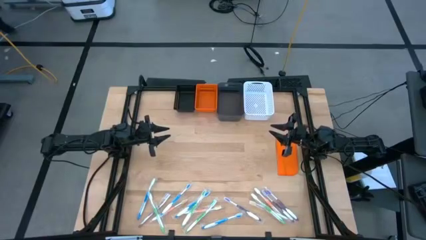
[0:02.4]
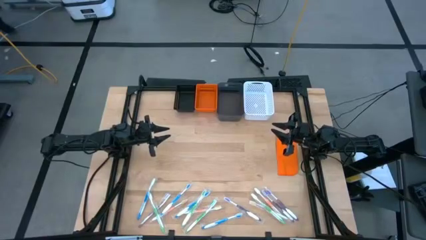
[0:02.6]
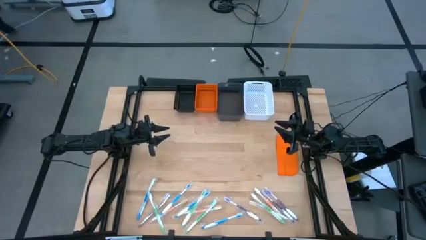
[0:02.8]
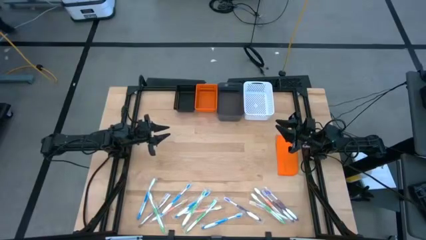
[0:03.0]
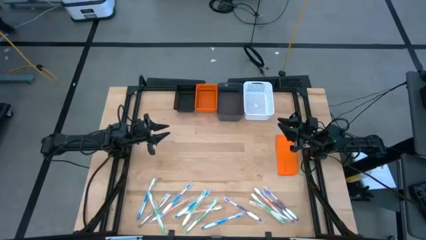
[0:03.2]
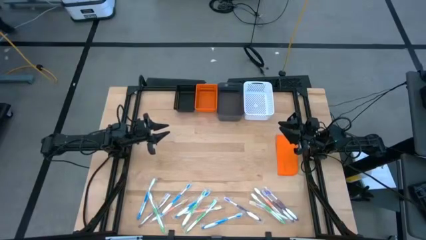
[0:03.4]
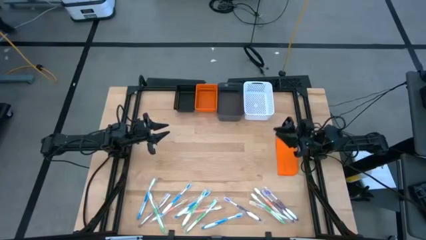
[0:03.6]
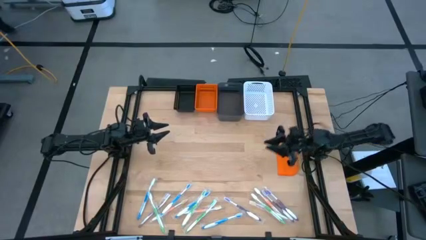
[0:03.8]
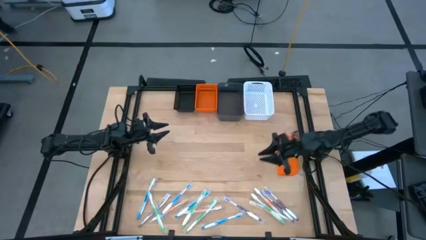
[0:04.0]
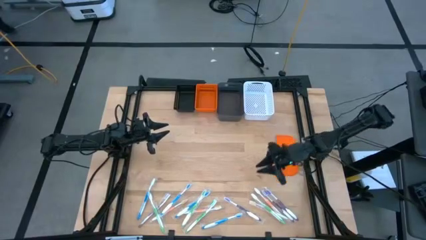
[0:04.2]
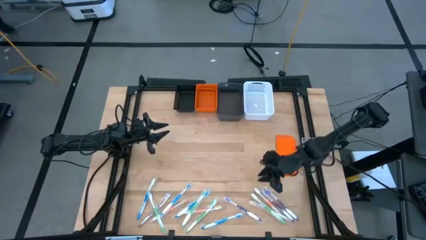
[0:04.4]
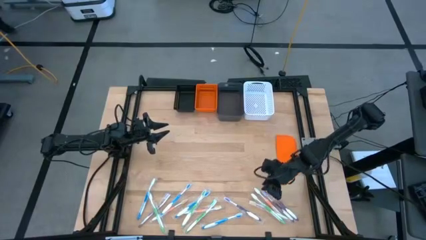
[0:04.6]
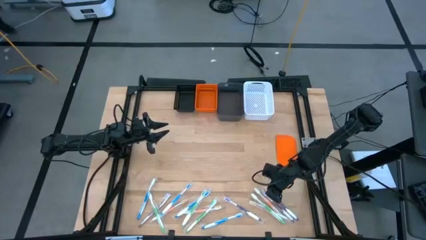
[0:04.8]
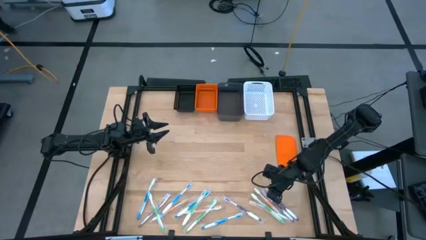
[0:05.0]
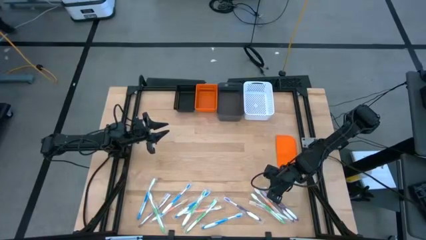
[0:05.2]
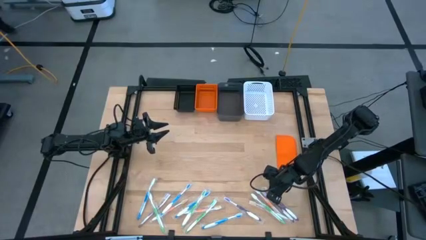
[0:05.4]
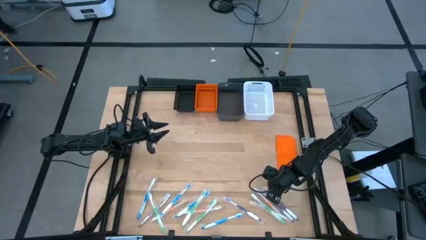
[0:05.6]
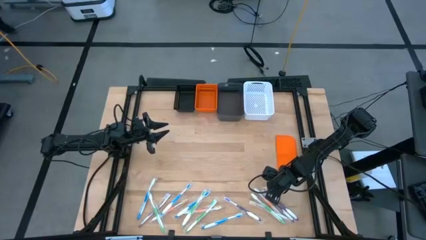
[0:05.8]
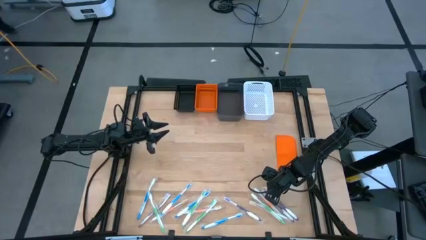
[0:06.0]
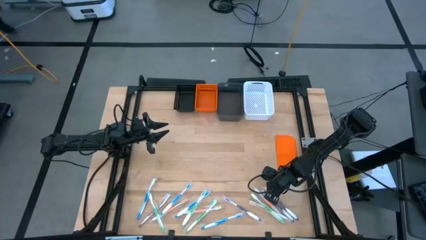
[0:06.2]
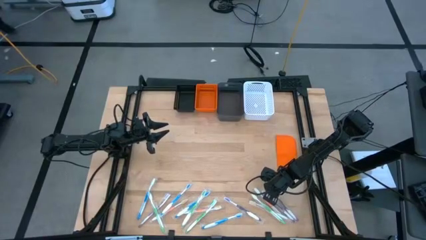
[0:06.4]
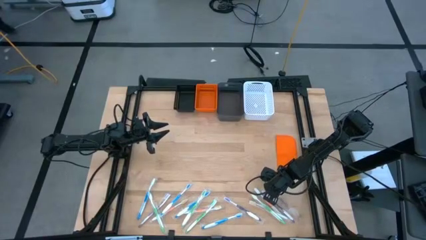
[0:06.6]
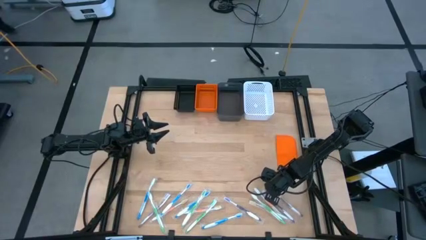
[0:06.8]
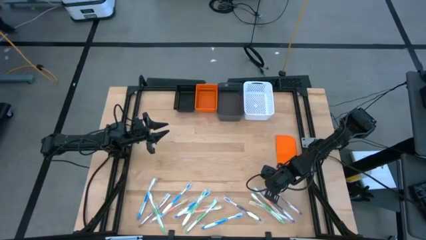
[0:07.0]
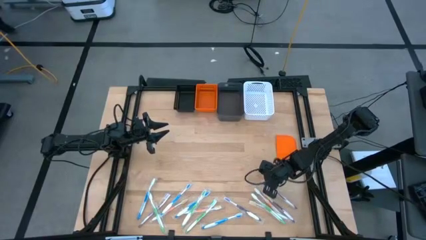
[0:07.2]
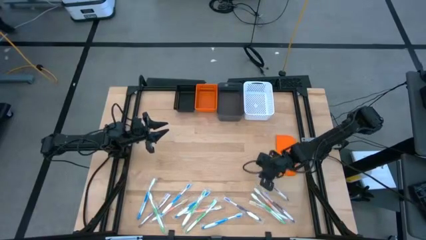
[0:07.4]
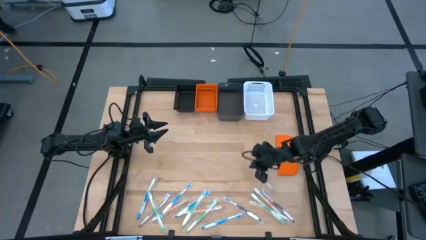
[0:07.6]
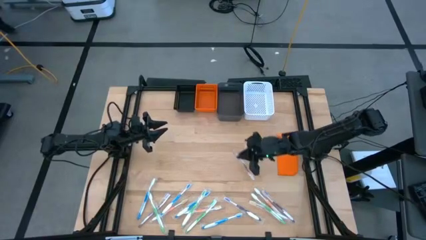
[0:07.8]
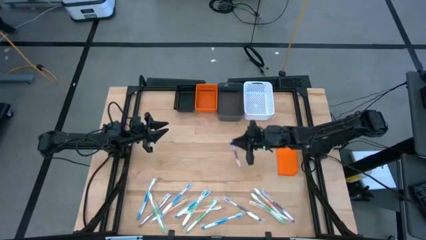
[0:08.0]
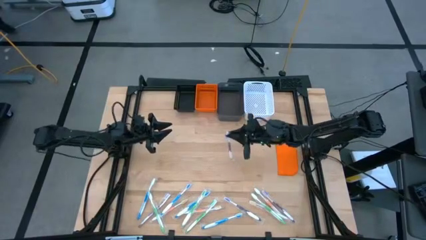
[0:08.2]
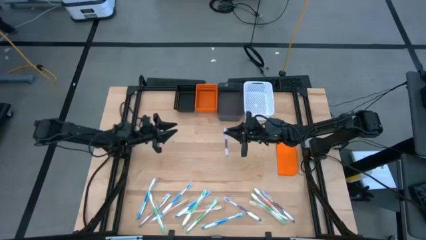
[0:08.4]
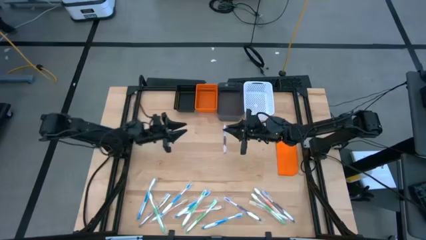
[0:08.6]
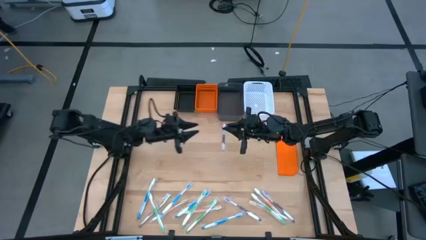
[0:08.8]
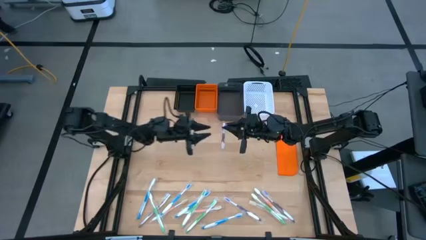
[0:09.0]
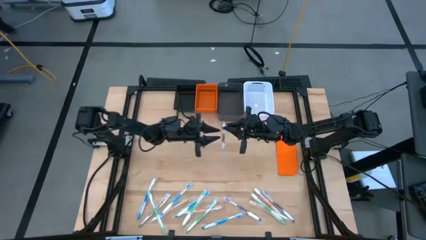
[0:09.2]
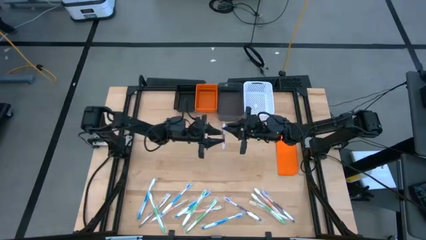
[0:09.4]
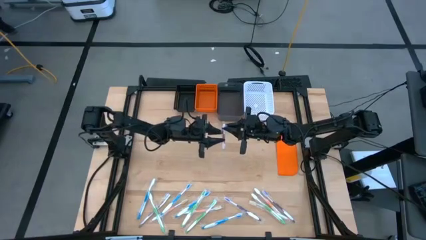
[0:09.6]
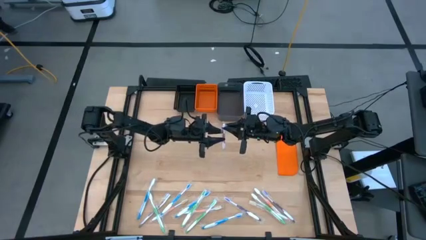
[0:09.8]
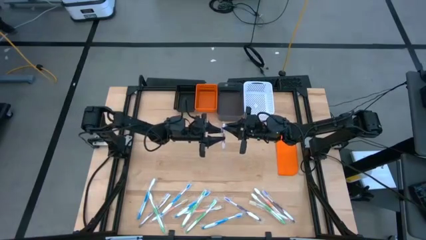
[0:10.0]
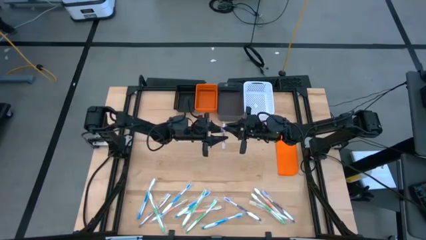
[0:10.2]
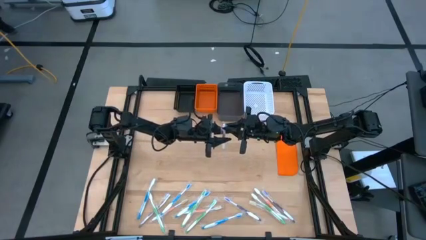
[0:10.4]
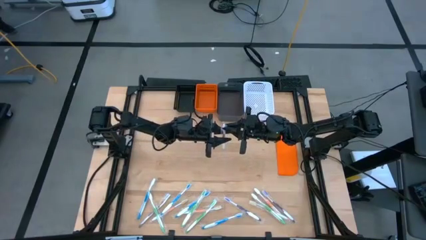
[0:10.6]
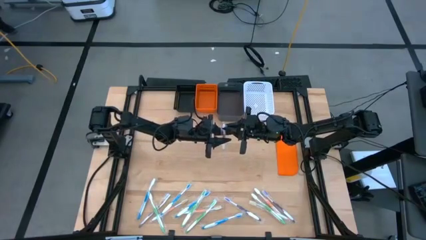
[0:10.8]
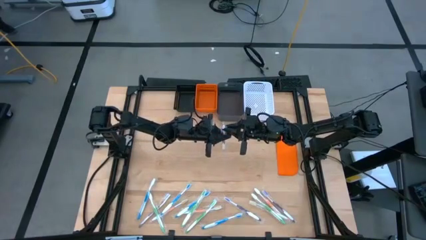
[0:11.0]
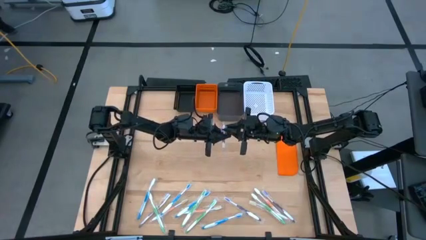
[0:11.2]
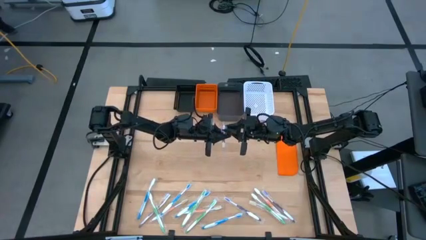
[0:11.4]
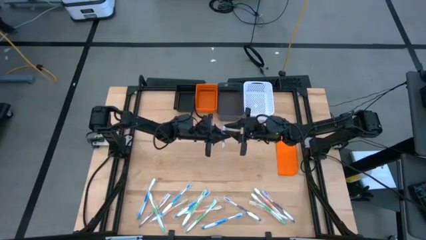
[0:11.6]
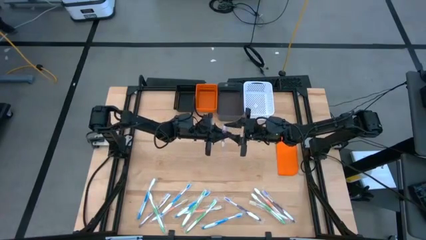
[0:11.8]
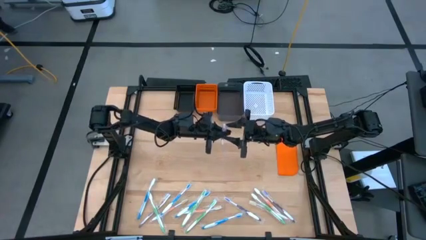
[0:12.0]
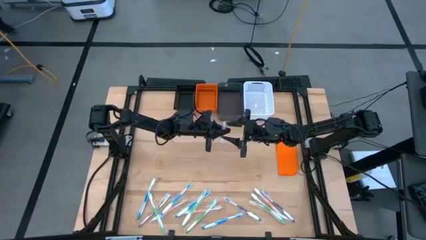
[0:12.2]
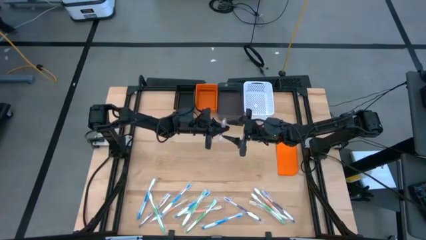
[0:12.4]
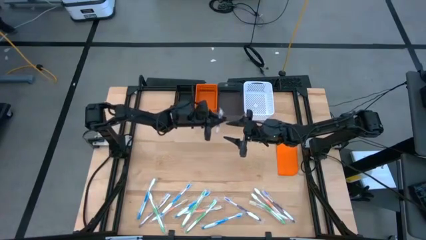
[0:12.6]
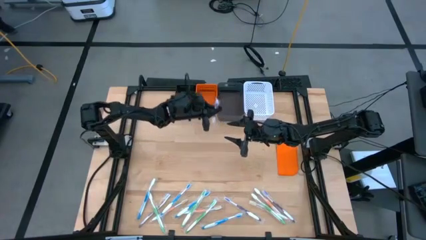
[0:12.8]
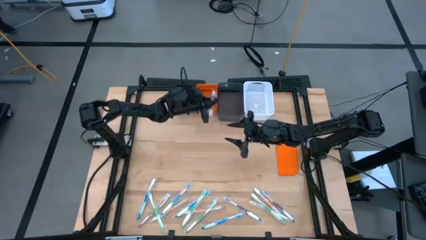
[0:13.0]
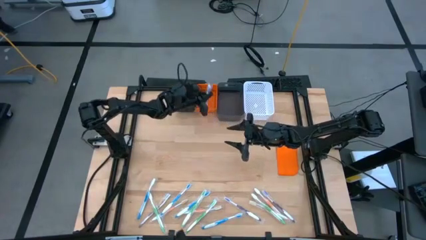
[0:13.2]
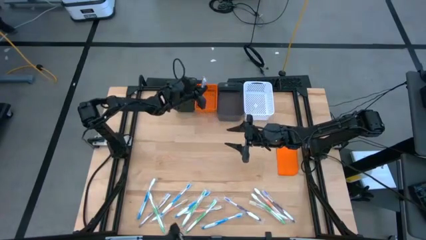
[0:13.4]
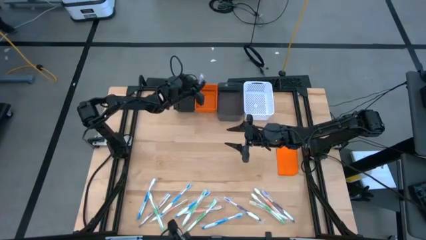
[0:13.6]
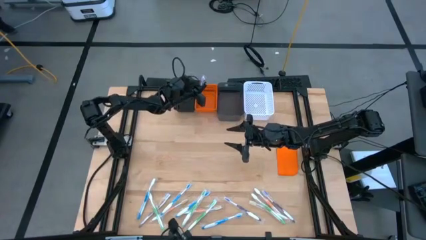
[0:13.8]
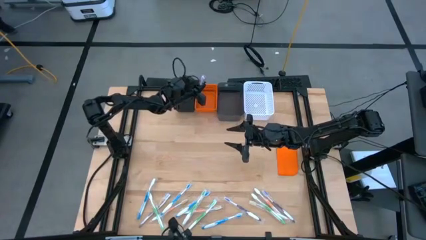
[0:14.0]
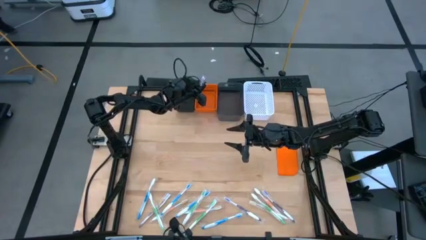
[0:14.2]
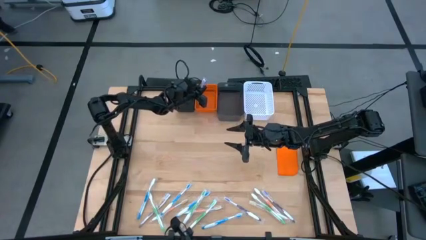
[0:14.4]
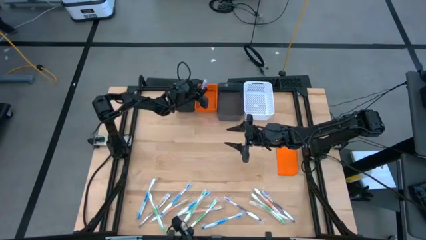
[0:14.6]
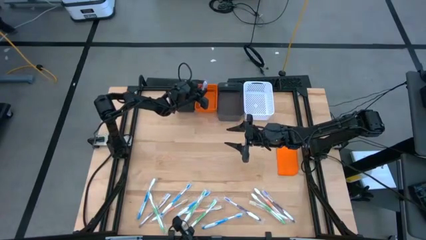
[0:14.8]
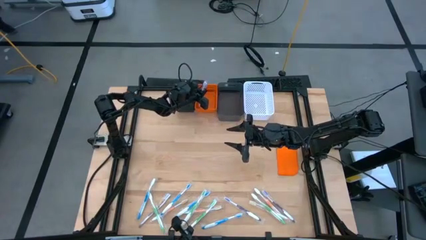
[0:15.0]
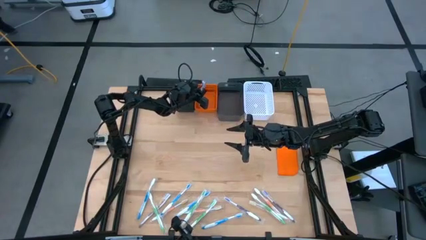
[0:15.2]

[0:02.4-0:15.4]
Task: Pick & Place Toothbrushes
Put the purple toothbrush into the orange bin

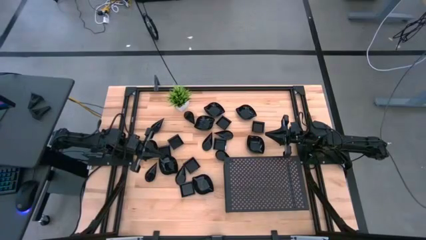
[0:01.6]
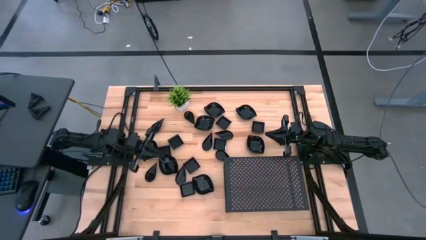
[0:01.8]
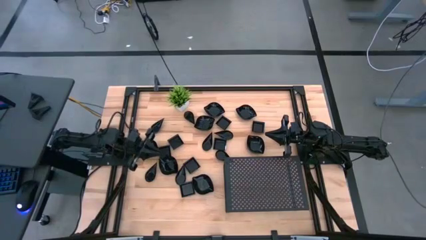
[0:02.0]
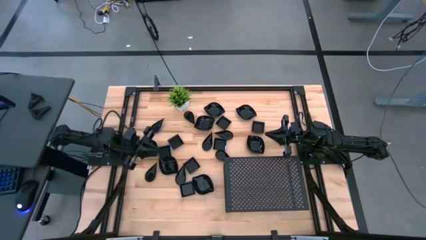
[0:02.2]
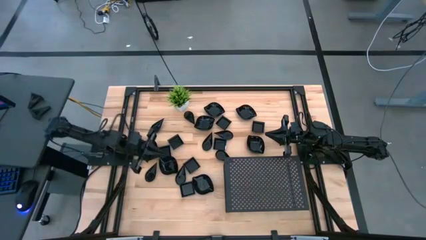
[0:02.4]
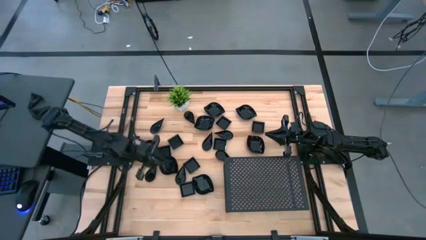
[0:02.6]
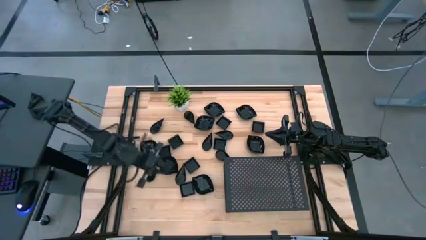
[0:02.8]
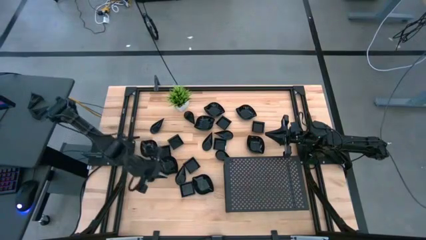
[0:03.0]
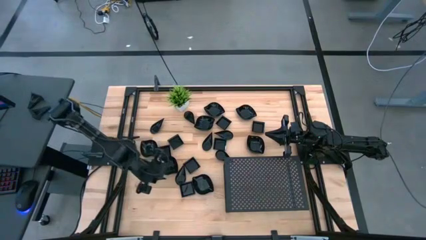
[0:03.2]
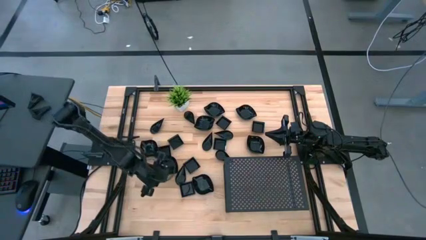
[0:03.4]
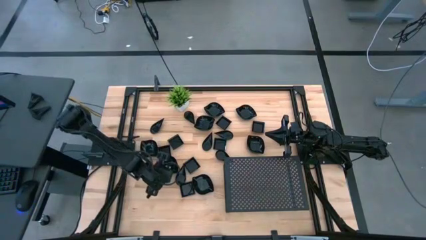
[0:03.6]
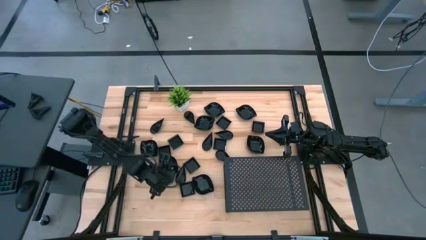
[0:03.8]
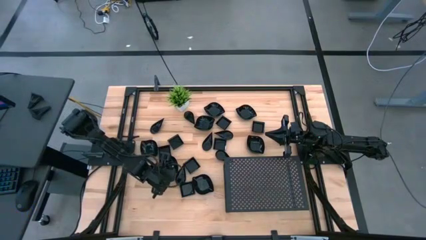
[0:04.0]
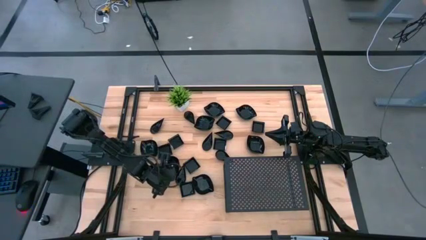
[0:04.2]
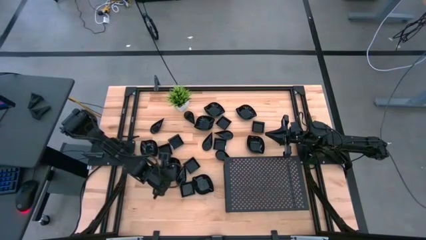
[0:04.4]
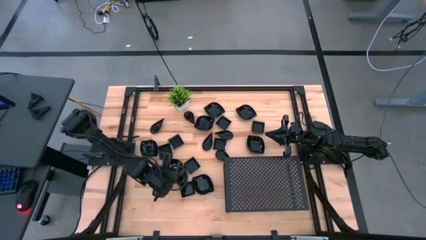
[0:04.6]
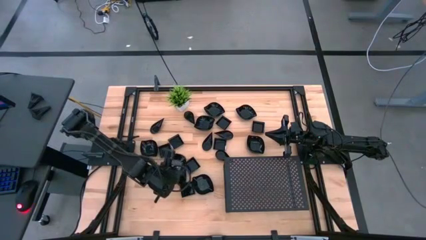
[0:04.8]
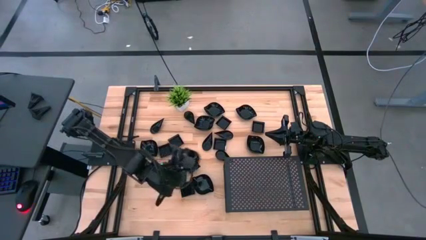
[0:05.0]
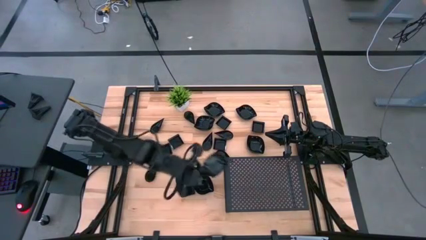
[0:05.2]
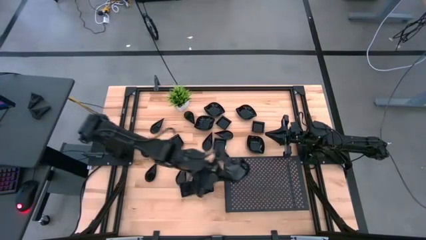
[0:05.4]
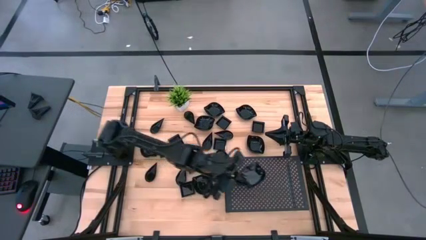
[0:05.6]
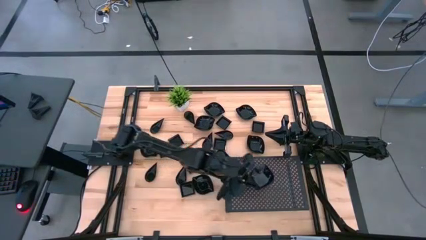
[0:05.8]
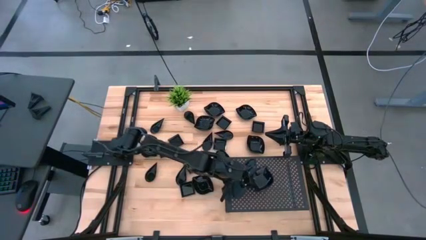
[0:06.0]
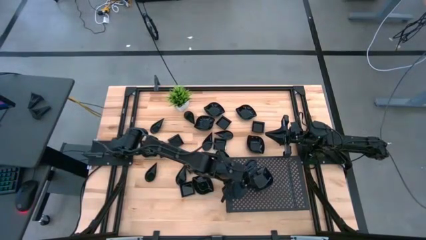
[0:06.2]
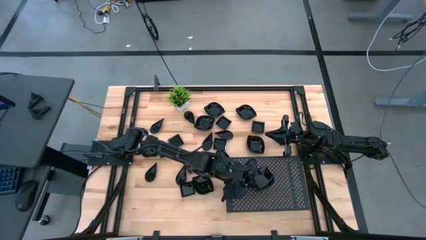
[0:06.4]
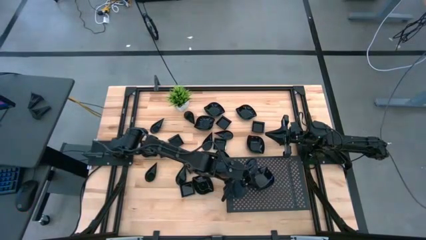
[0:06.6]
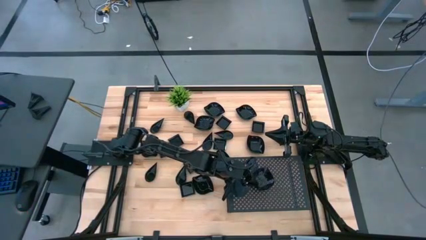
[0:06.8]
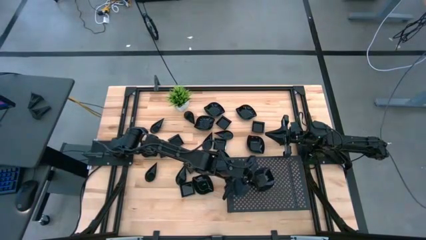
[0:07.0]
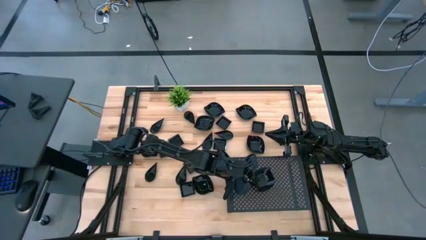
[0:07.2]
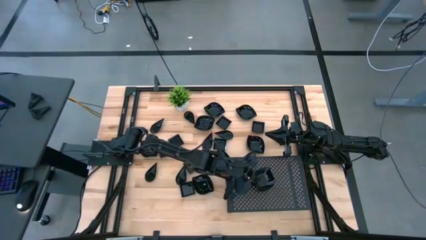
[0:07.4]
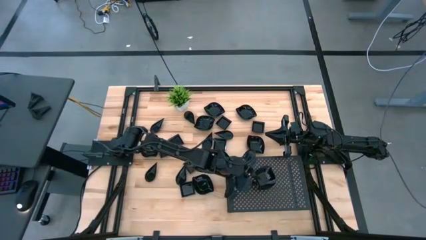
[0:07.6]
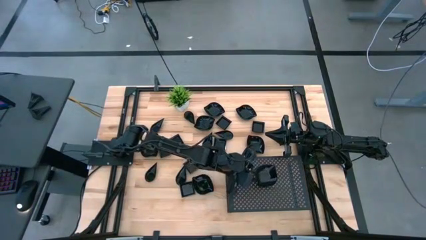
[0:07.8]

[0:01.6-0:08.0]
Task: Pick & Place Mini shaped plates
Put the leaf shaped plate on the shelf
